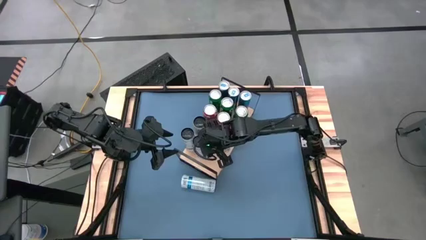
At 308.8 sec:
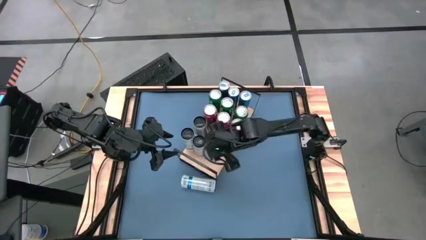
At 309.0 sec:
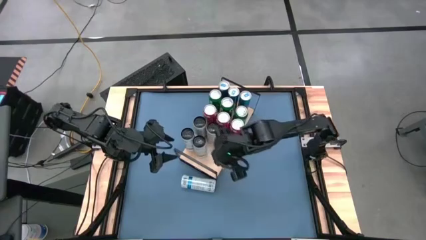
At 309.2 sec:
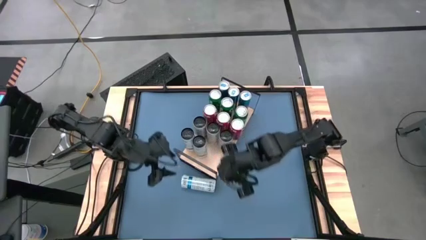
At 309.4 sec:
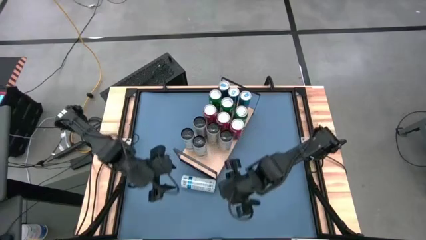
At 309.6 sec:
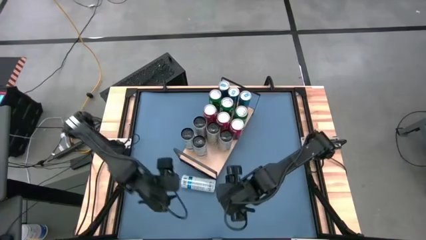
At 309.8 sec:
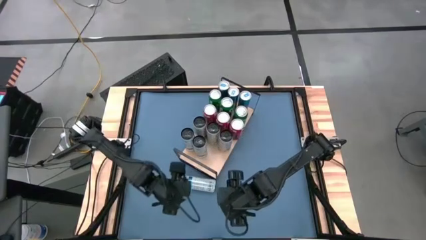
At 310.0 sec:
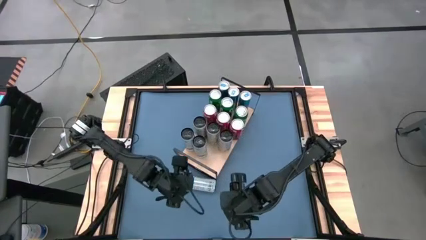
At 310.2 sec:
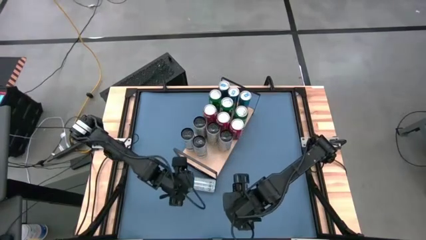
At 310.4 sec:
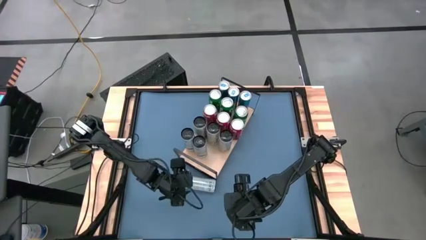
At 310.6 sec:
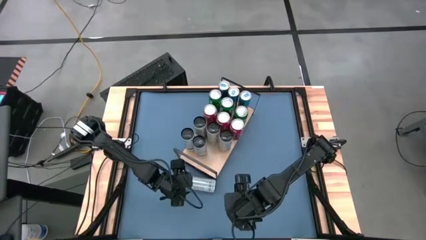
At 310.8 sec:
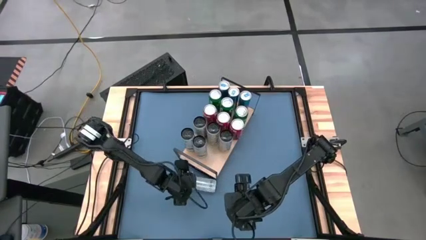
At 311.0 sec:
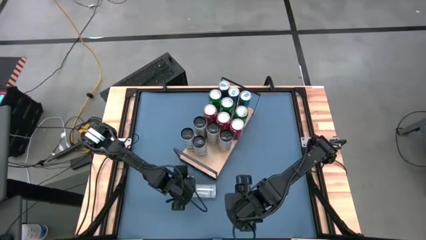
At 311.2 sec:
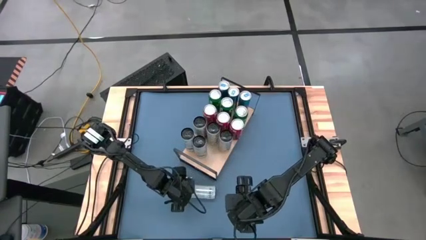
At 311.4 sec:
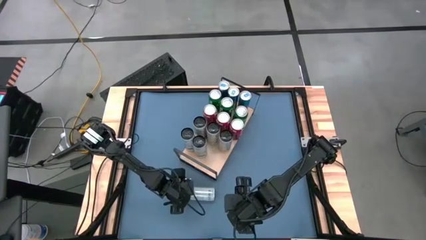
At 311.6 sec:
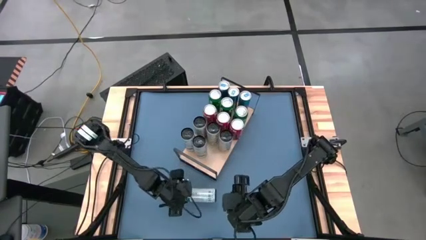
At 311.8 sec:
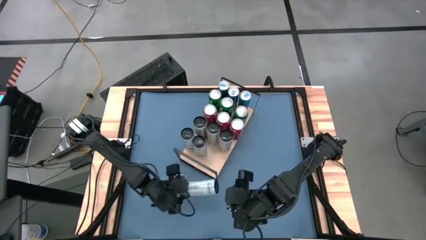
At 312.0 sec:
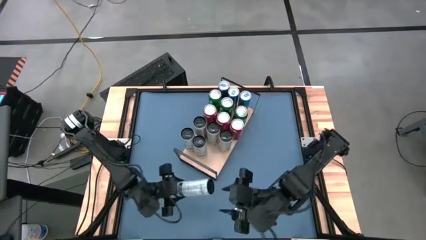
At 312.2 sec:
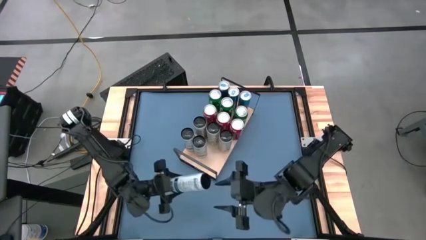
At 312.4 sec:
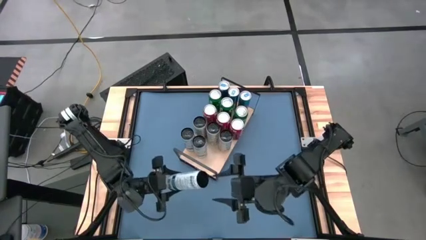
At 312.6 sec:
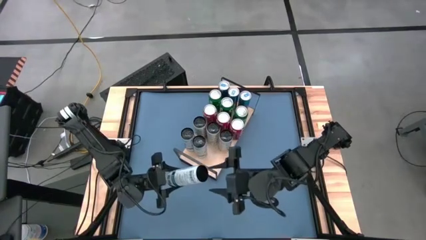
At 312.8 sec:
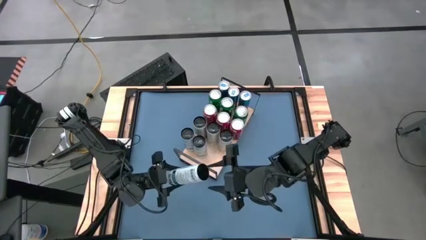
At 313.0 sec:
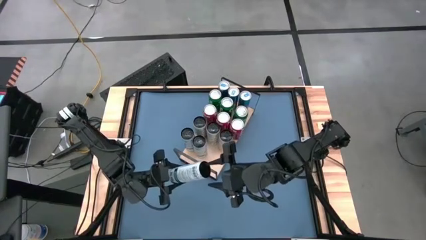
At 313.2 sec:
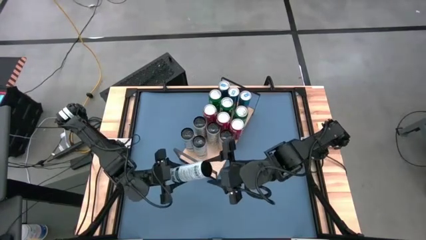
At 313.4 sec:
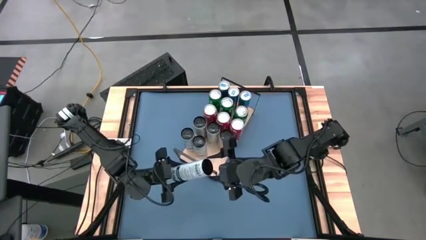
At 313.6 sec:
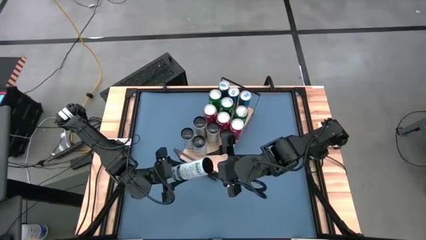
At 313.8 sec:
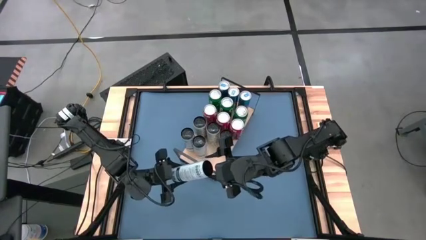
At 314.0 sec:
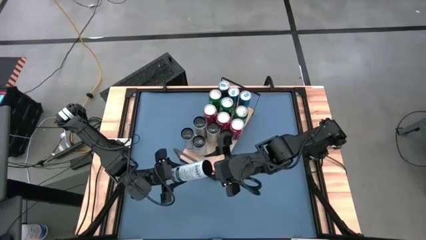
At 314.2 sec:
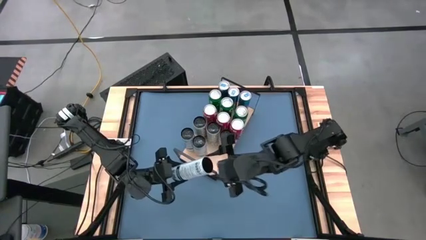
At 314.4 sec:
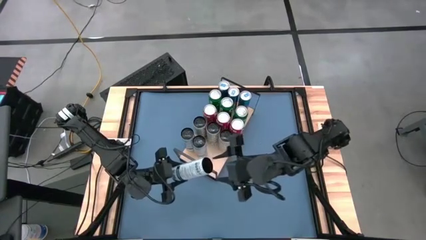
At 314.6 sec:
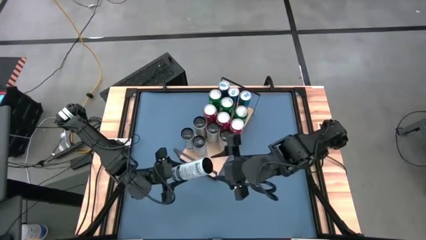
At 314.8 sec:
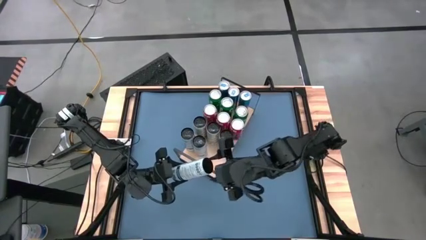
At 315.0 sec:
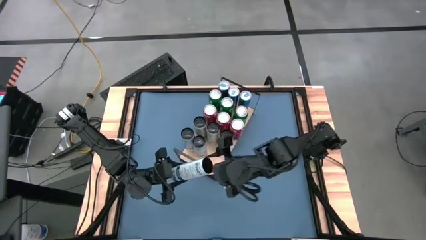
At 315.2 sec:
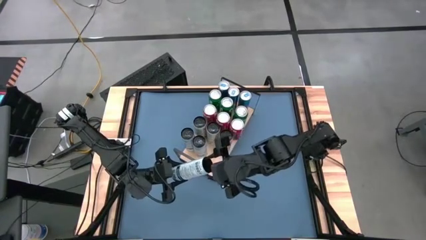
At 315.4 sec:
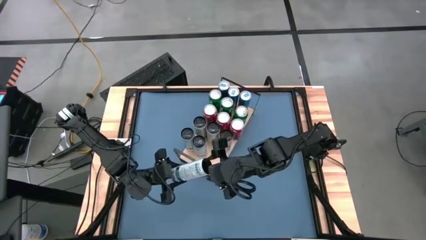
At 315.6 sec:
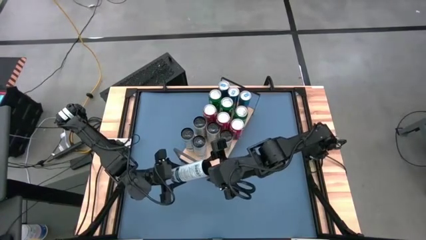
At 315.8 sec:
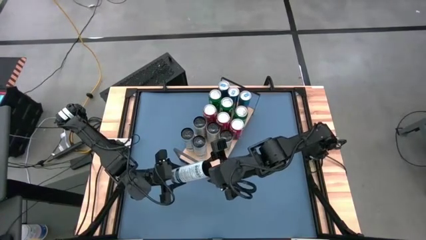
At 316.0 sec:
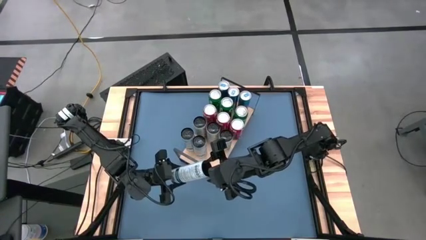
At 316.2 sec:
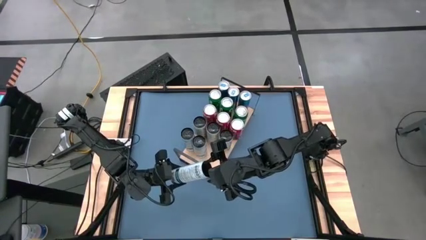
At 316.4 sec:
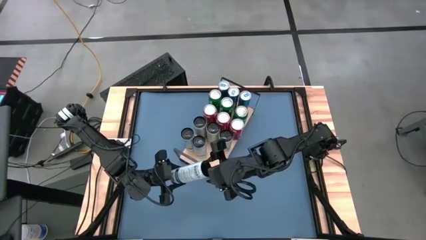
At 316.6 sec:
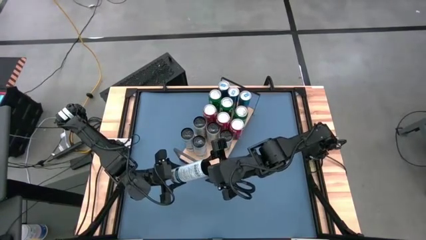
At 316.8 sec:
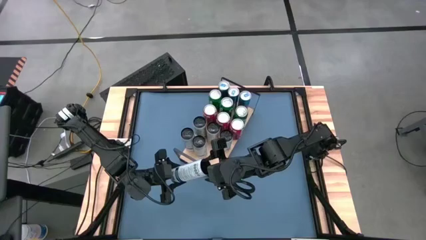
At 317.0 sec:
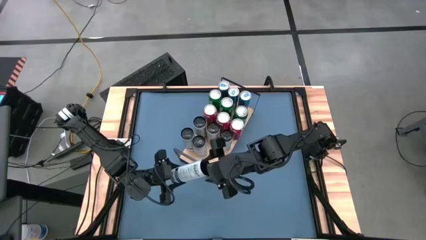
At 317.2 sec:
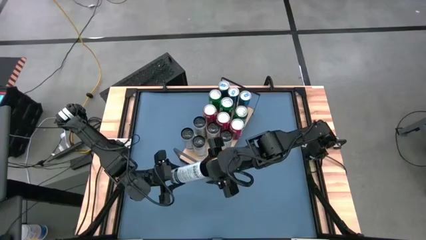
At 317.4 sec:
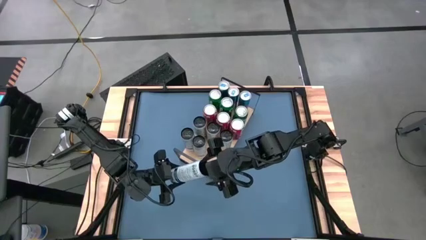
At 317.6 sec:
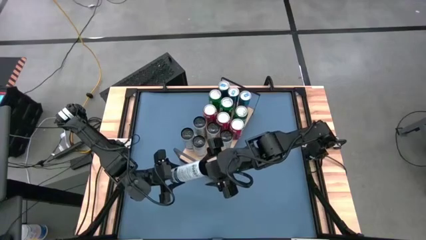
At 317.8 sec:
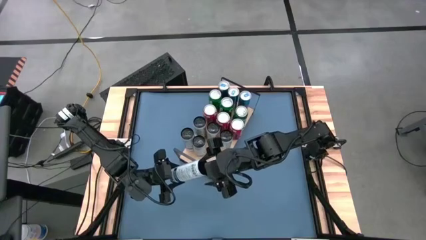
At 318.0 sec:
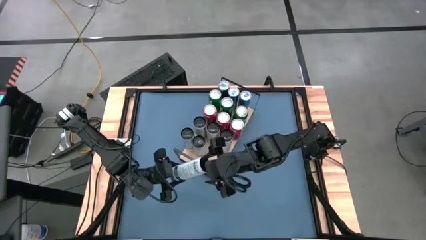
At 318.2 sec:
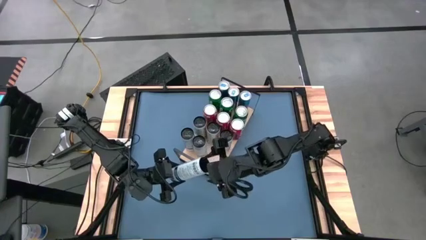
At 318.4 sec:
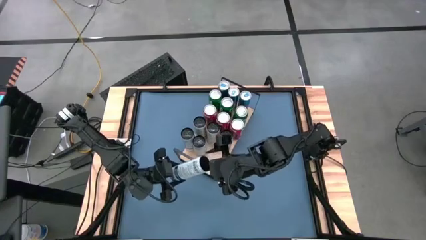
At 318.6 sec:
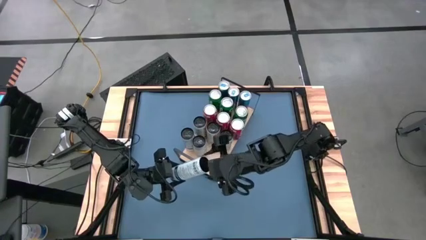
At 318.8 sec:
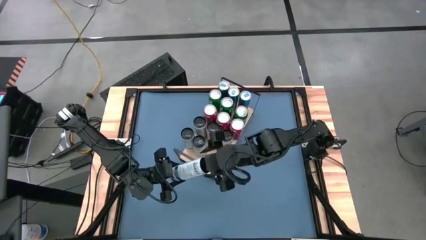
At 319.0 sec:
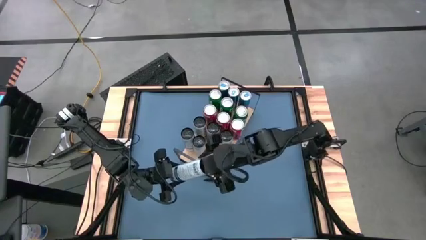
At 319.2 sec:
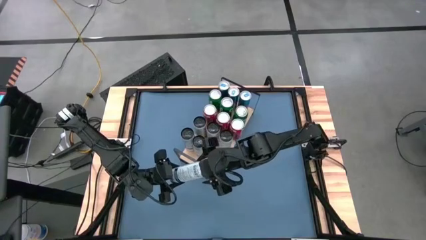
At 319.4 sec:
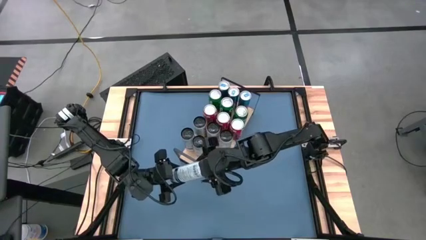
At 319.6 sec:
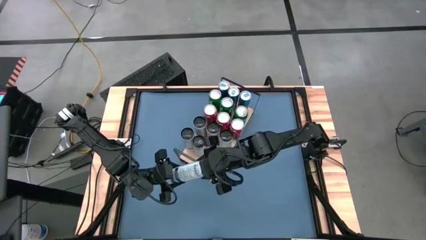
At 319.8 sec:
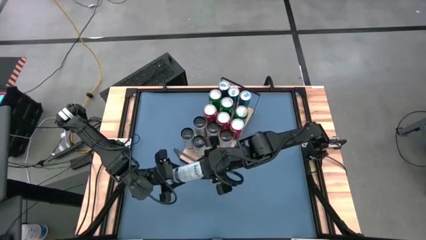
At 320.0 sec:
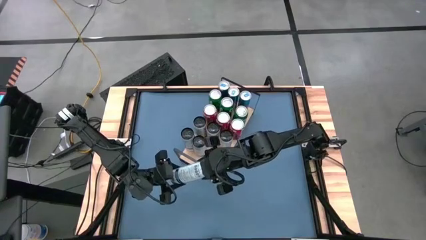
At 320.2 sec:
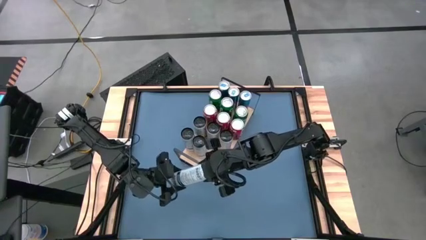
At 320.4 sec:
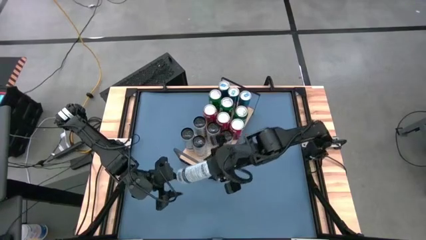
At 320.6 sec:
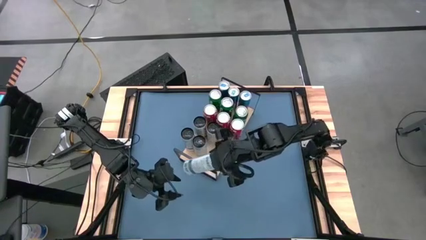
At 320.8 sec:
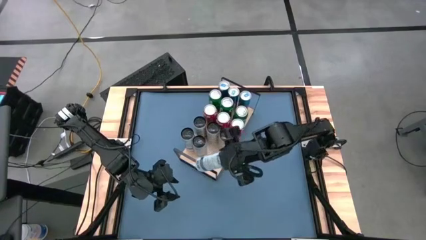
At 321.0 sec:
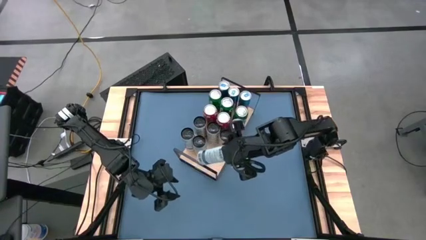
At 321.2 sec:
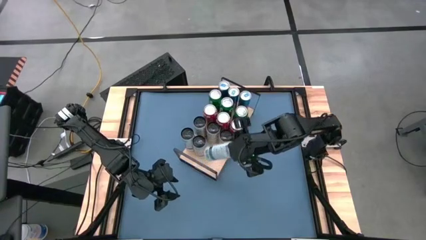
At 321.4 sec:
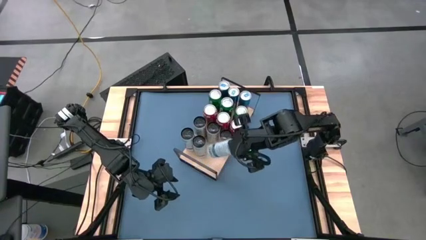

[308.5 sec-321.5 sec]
Task: Place canned beverage on shelf
Put white blue soda can on the shelf aligned with the other white blue soda cans

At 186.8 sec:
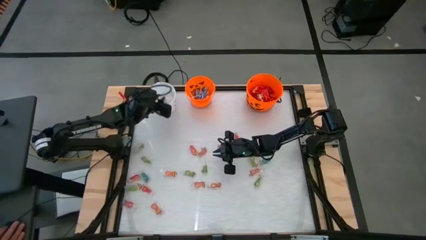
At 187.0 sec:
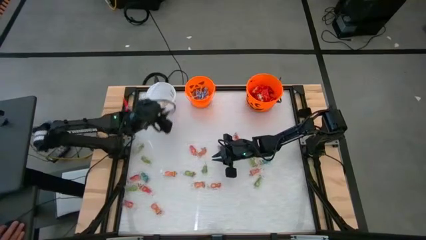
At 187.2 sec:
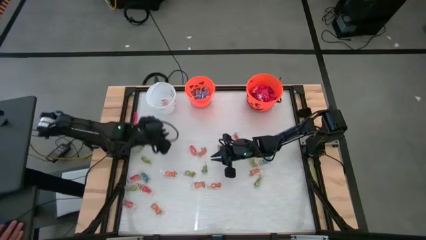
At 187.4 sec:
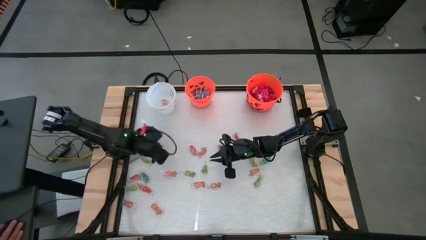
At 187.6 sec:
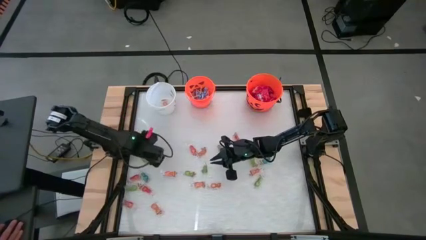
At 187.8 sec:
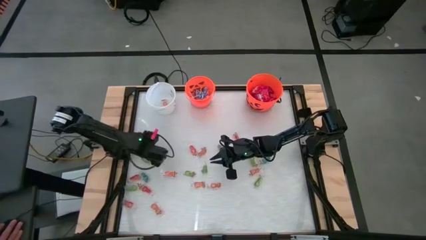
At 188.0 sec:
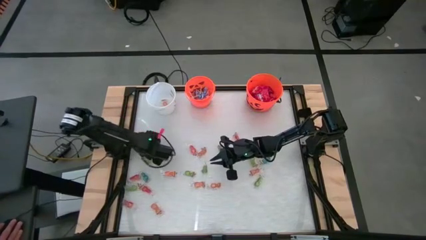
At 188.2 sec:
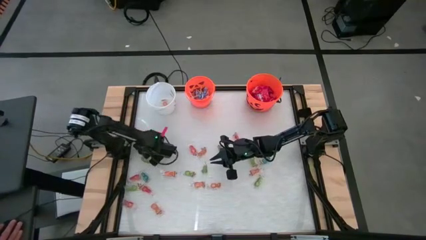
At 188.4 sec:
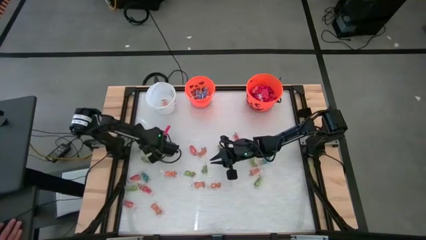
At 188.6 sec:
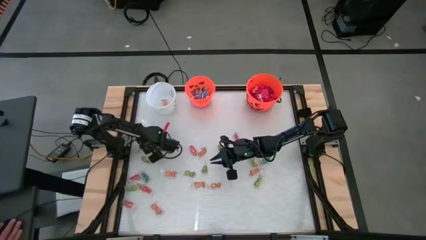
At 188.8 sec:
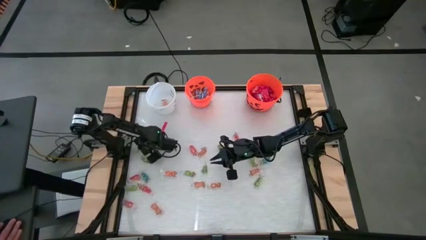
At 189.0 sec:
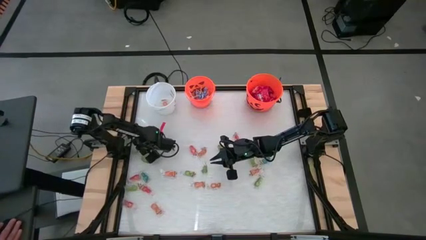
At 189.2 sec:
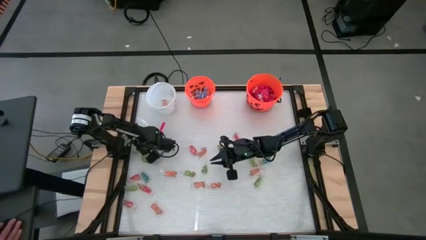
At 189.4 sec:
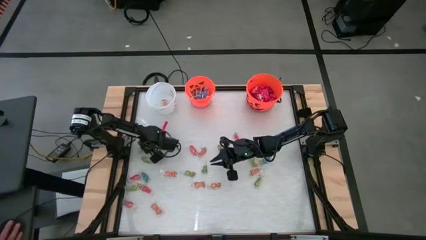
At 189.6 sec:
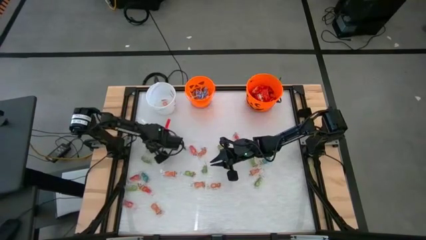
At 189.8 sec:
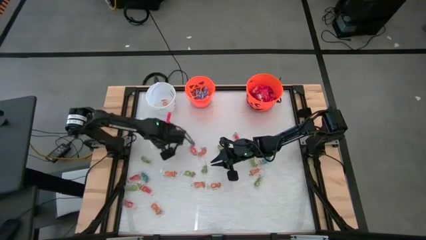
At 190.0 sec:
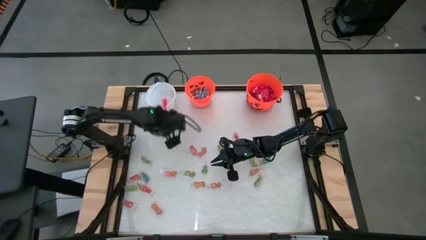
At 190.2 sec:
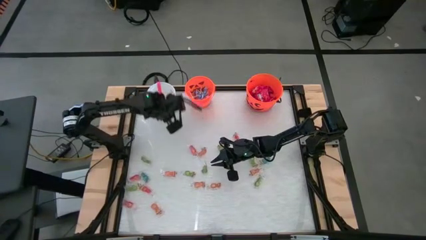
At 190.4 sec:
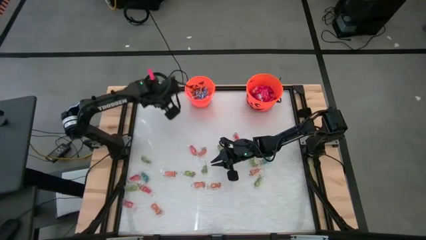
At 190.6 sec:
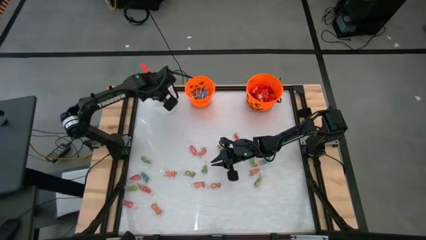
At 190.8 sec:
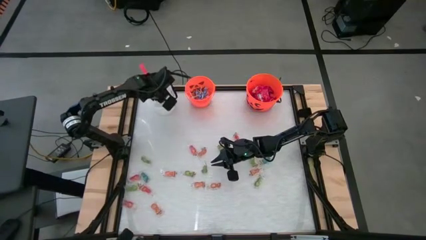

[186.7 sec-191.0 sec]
Task: Sort candy by brand, put in halloween buckets
Put the green gummy into the white bucket
